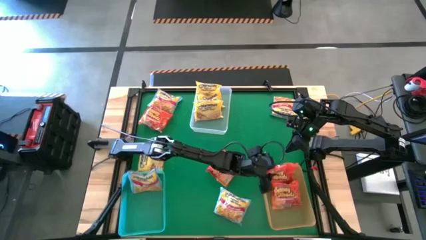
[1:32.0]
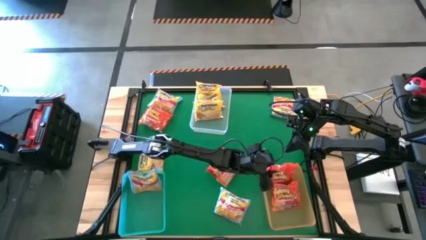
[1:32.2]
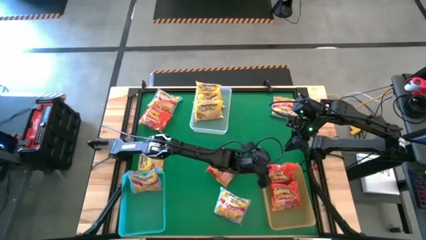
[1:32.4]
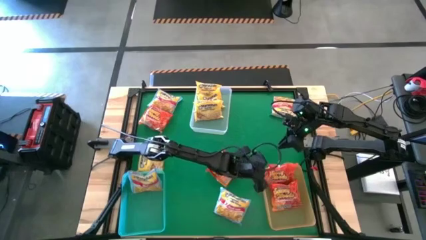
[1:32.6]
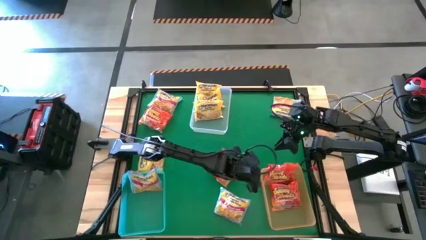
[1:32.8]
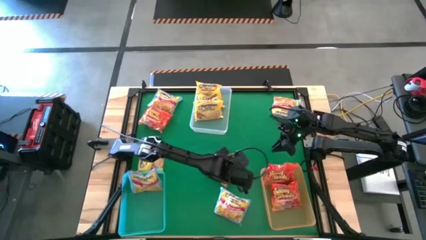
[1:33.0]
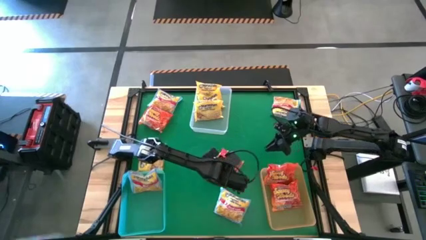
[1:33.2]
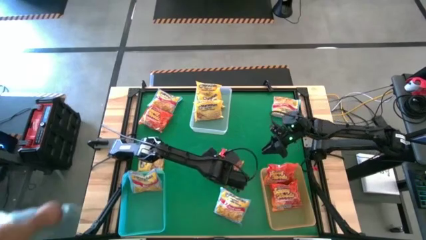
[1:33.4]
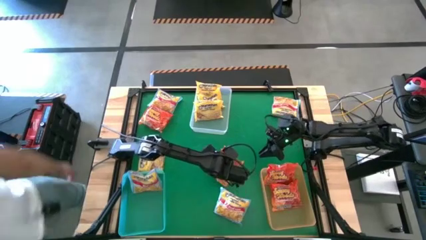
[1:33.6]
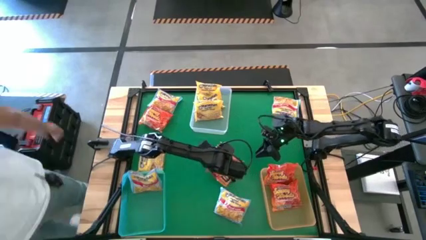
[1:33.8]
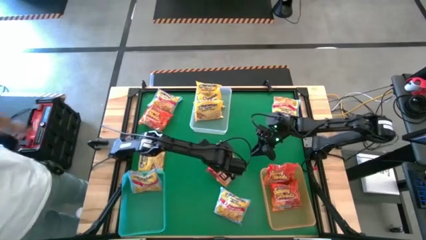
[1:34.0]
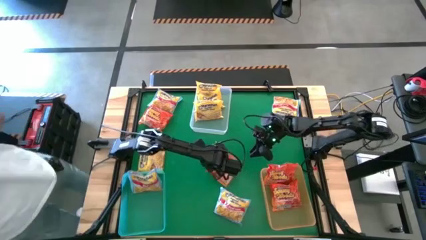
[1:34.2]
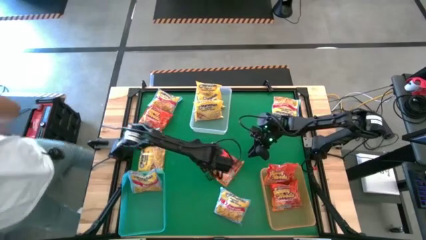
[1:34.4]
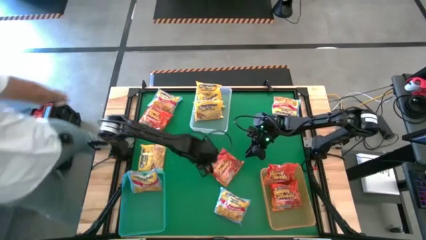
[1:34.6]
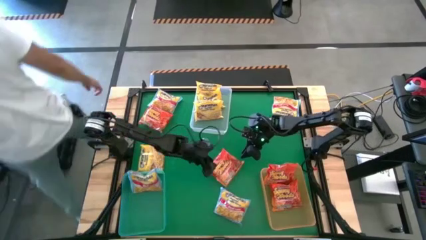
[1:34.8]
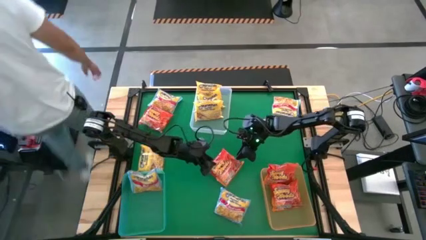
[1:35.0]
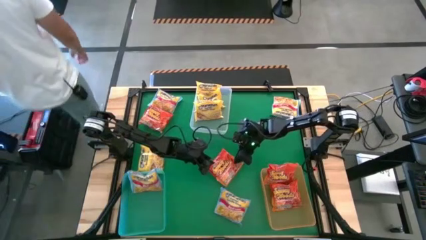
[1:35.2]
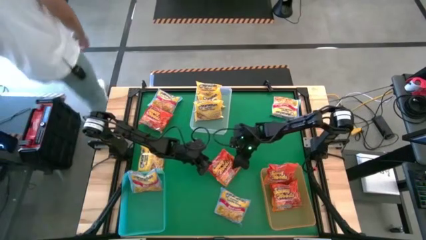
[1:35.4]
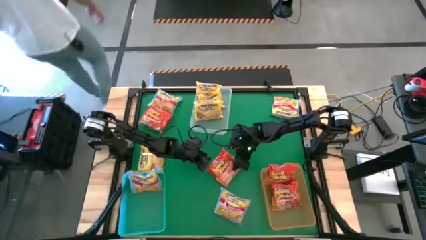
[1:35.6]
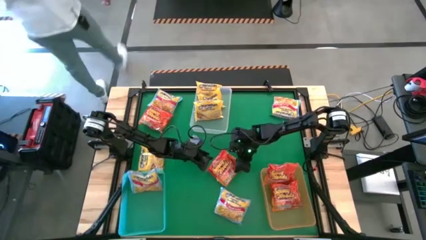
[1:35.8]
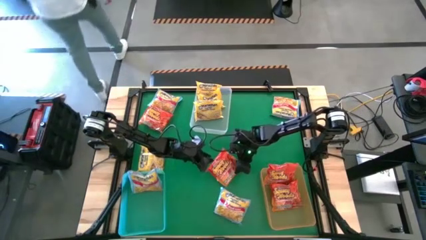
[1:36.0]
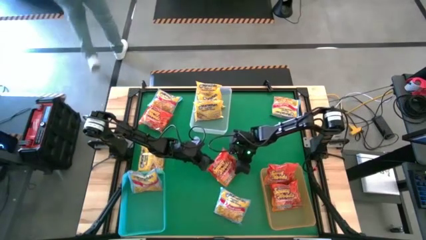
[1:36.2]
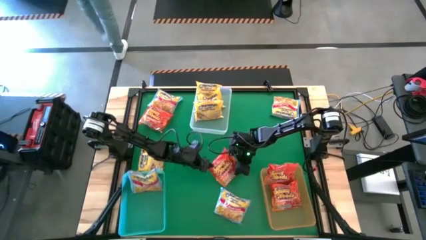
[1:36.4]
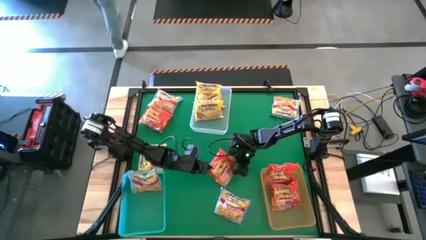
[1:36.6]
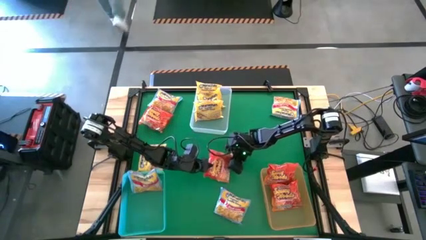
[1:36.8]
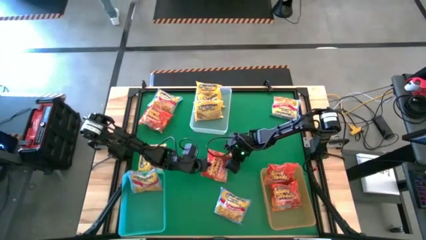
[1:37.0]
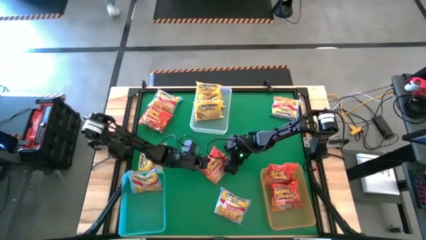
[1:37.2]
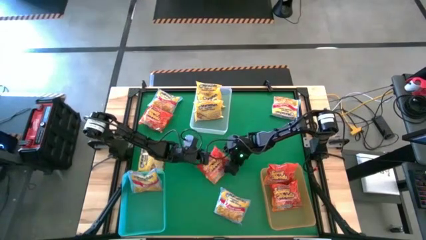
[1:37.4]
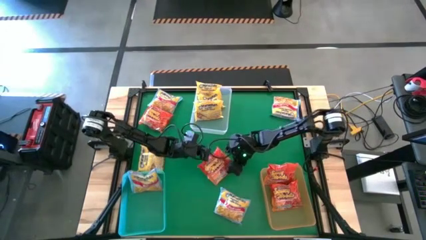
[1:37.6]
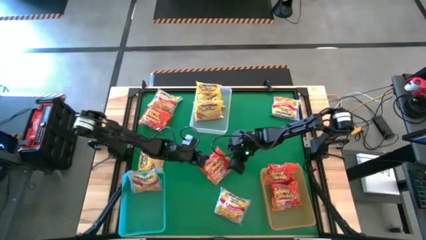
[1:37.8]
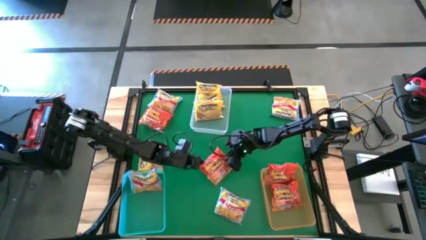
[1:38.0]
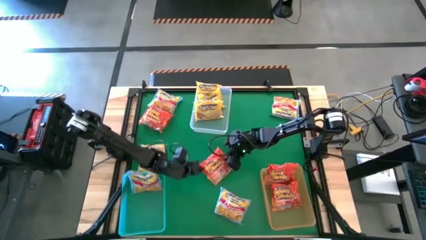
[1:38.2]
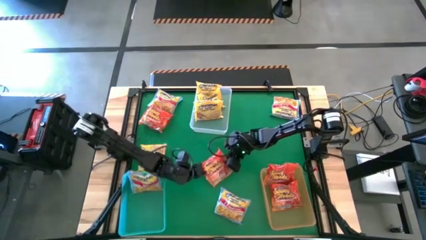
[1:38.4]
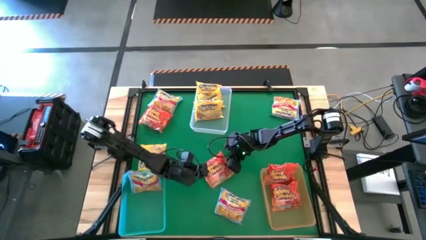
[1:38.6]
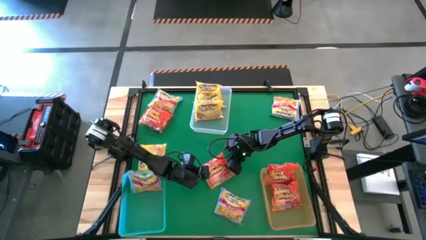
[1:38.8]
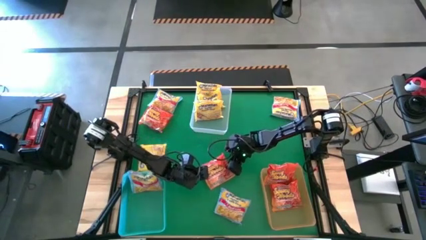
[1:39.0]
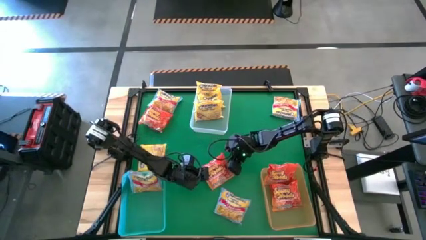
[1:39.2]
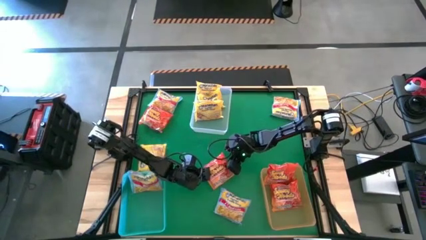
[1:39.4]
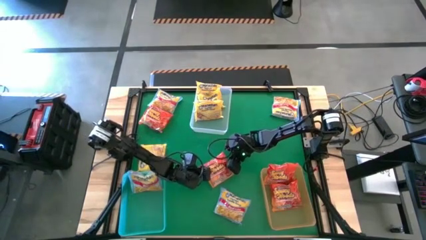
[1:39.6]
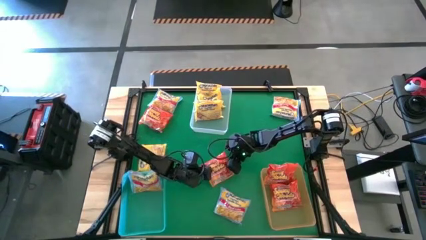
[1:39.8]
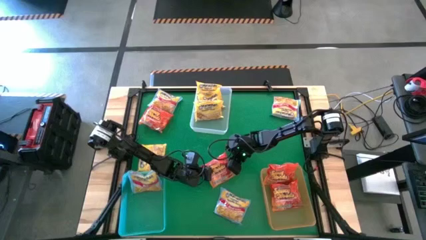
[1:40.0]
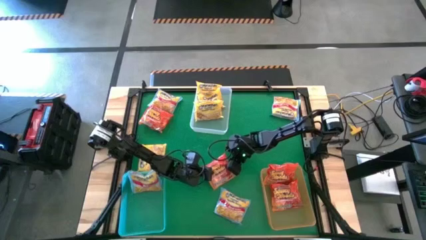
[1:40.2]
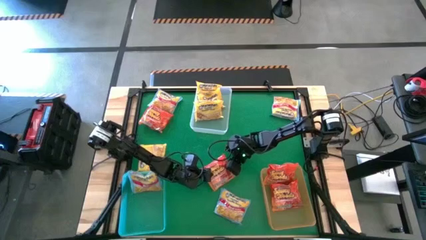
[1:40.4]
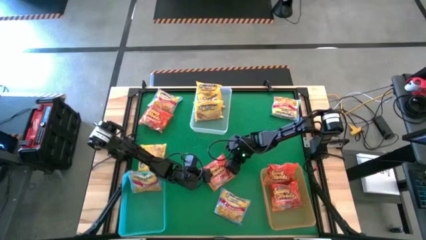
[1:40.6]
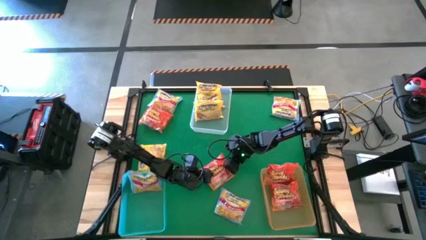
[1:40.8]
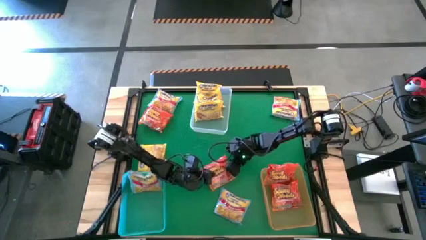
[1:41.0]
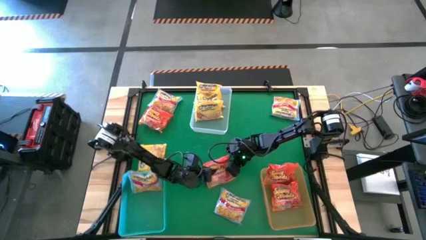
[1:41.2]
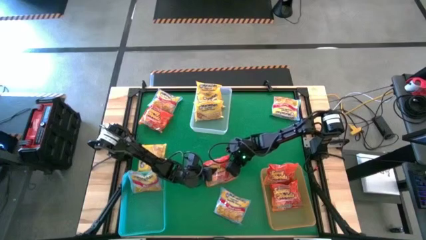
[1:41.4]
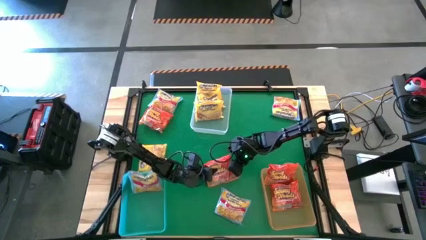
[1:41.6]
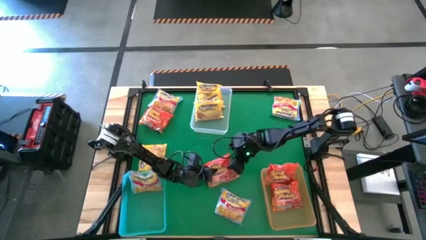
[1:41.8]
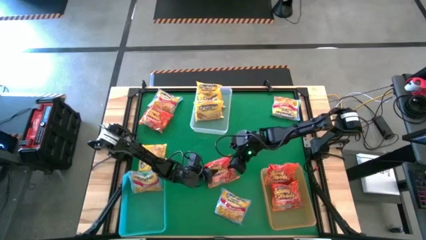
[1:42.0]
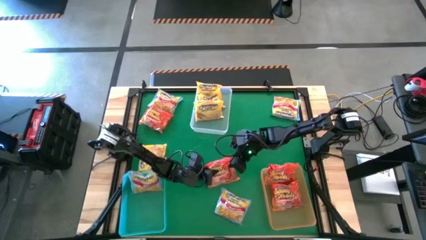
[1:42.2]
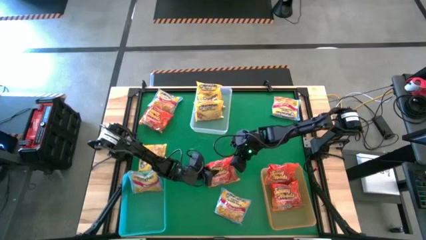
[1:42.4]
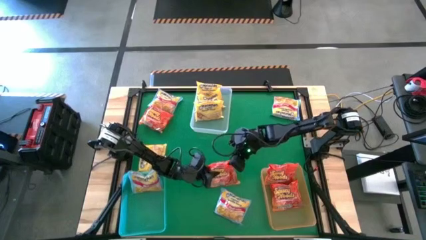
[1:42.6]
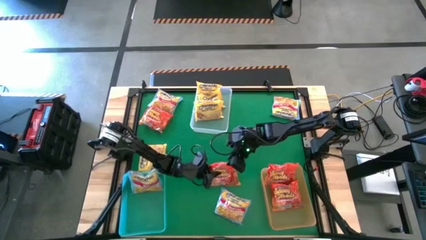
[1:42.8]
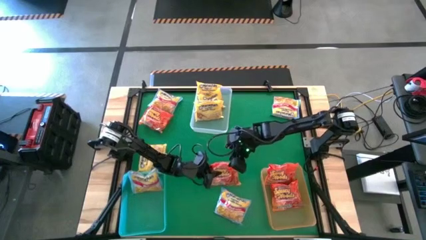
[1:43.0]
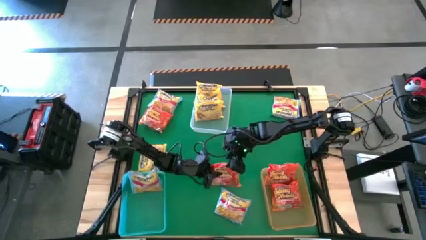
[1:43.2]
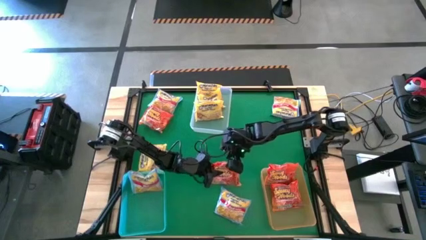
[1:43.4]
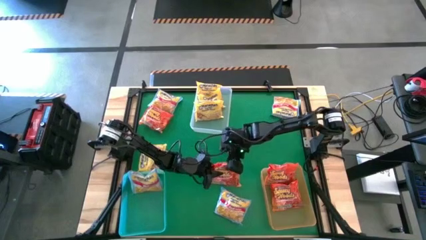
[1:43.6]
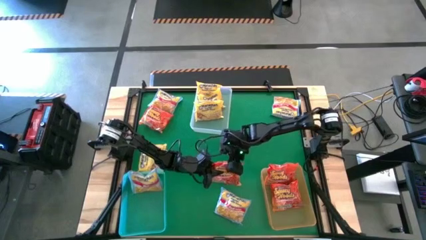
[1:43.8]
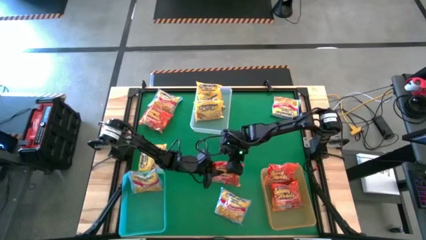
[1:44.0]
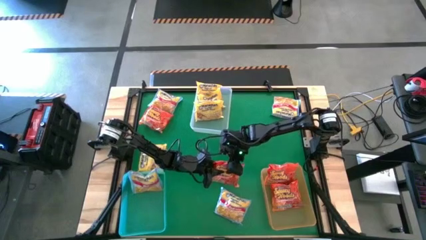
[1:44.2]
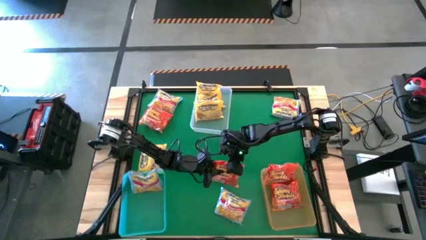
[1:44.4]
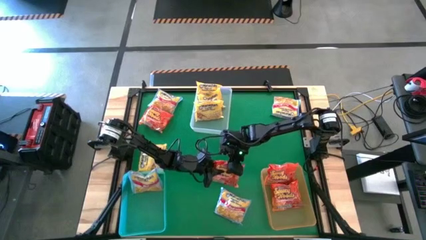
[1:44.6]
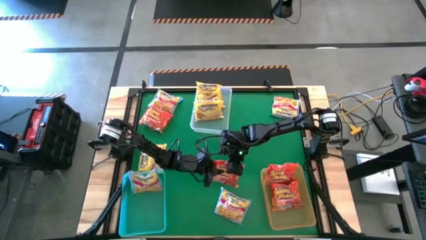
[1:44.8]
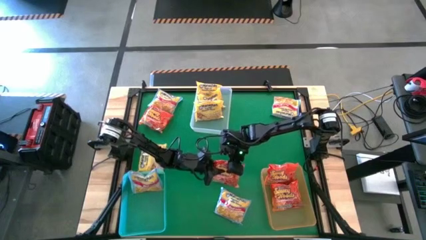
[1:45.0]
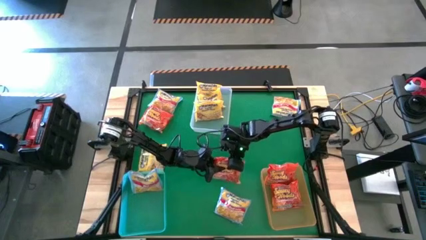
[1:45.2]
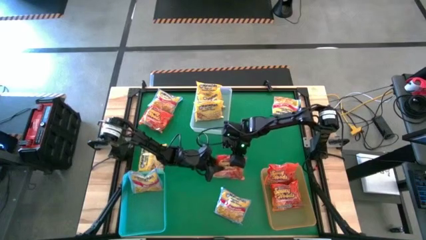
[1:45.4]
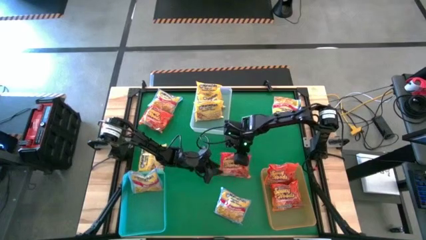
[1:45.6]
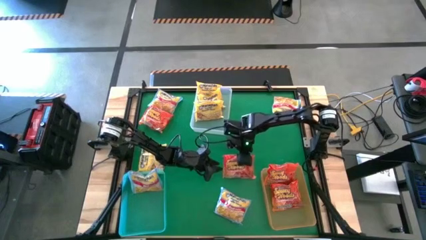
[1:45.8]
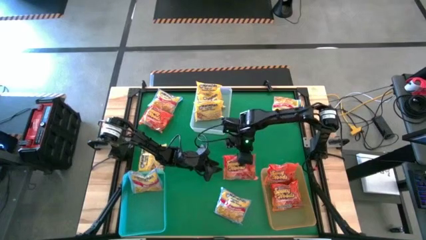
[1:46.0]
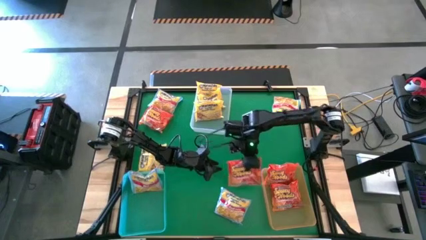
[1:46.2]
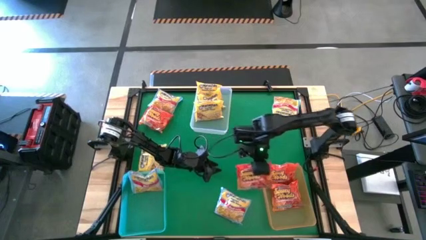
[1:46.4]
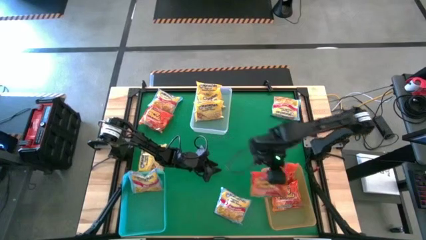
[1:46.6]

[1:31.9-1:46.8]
Task: Sort Maruchan noodles
Put the bottom orange noodle pack into the orange bin
